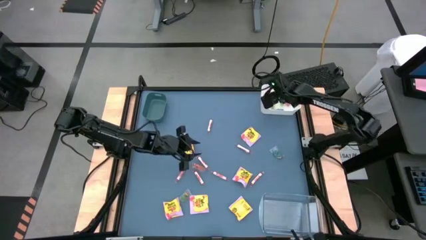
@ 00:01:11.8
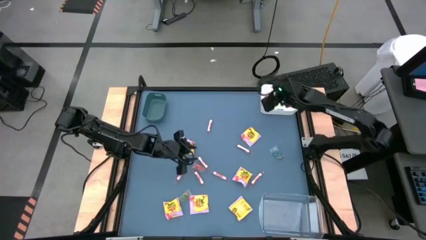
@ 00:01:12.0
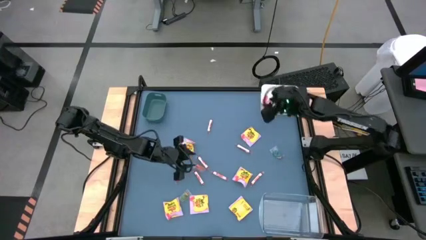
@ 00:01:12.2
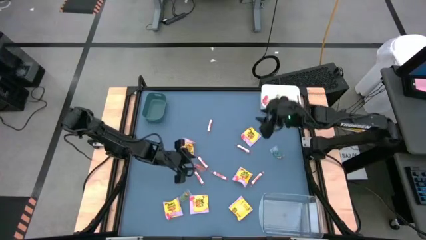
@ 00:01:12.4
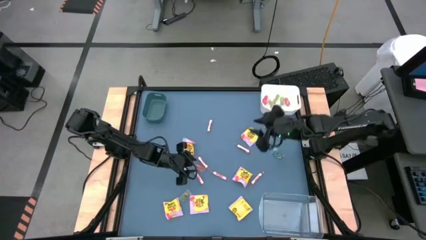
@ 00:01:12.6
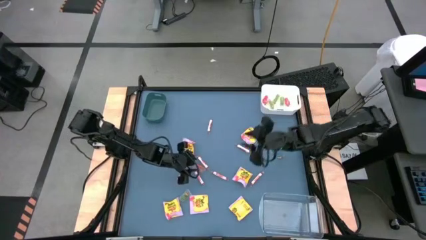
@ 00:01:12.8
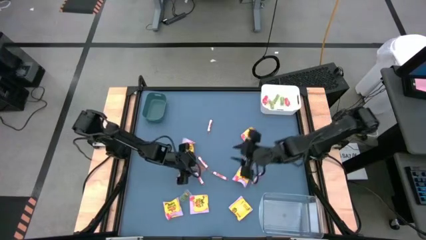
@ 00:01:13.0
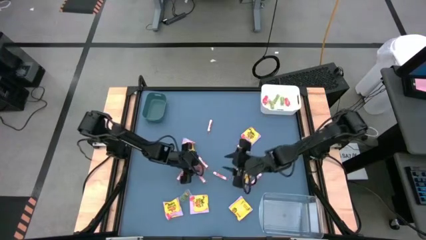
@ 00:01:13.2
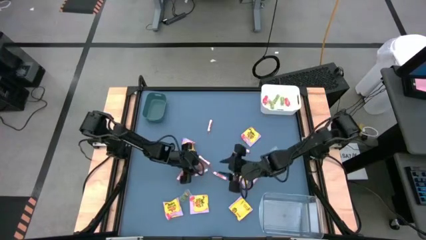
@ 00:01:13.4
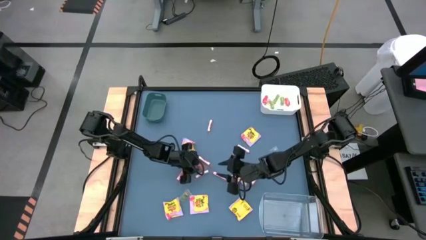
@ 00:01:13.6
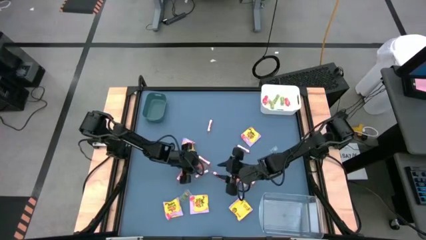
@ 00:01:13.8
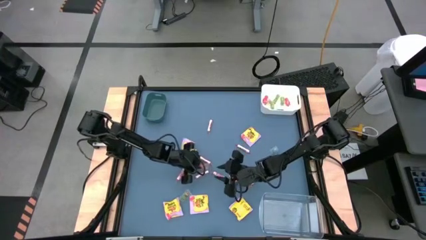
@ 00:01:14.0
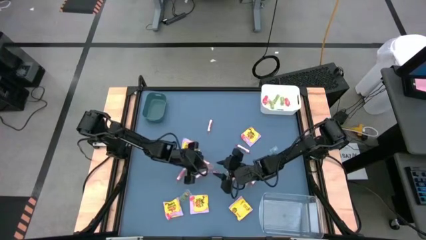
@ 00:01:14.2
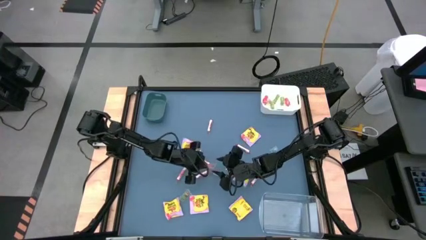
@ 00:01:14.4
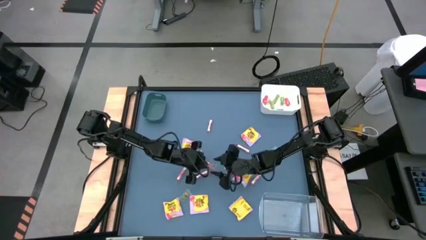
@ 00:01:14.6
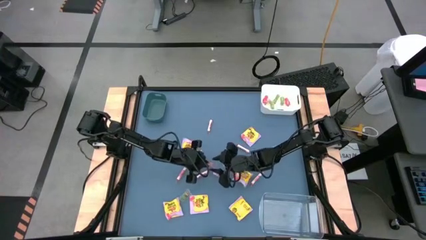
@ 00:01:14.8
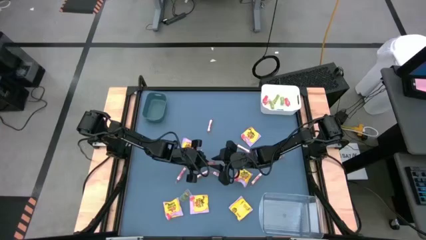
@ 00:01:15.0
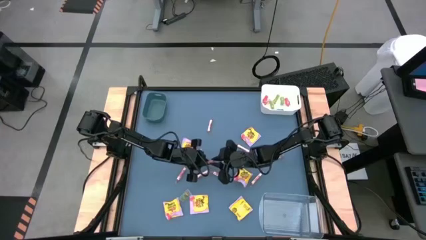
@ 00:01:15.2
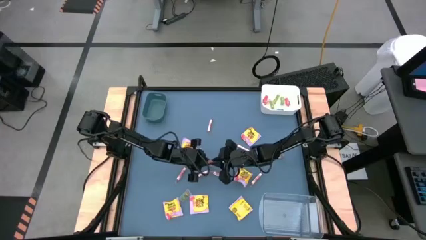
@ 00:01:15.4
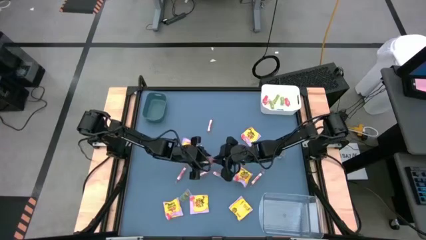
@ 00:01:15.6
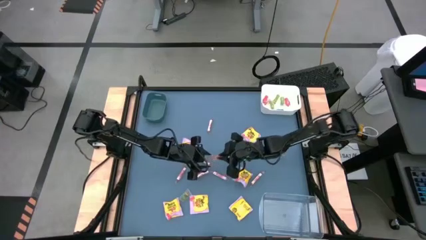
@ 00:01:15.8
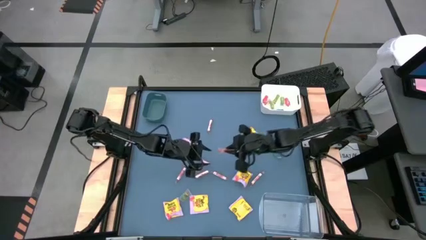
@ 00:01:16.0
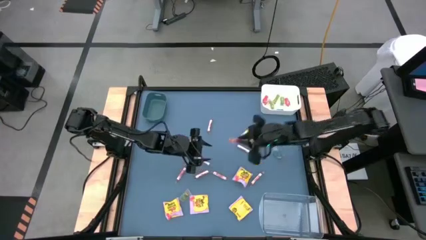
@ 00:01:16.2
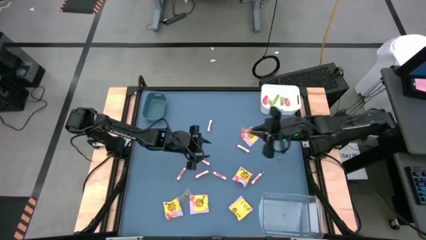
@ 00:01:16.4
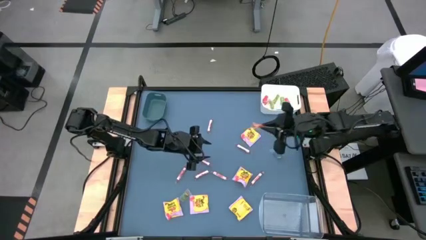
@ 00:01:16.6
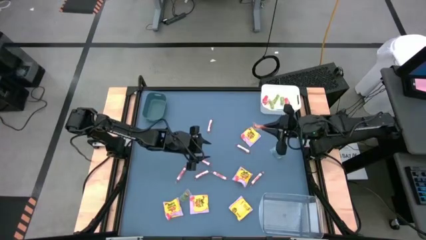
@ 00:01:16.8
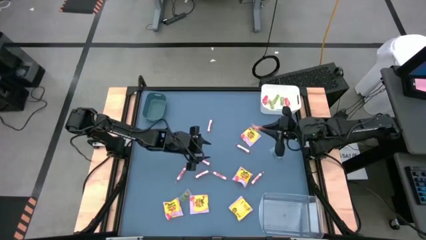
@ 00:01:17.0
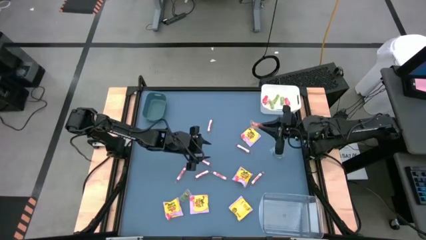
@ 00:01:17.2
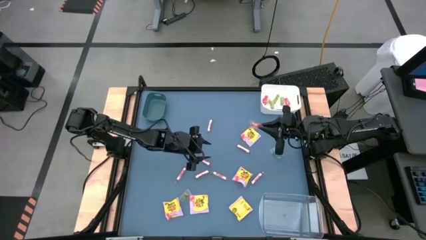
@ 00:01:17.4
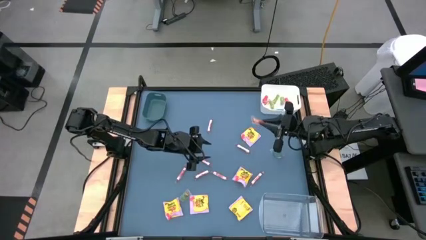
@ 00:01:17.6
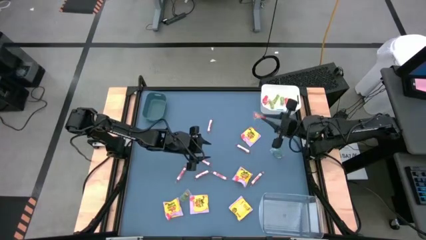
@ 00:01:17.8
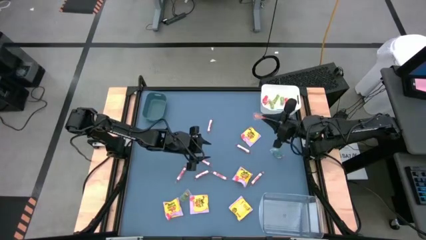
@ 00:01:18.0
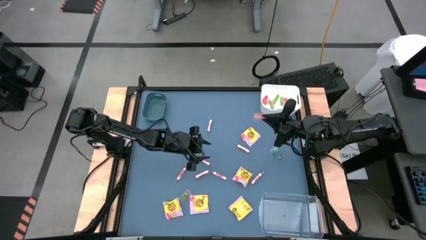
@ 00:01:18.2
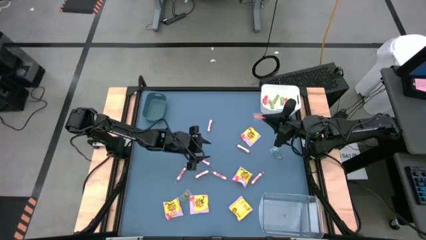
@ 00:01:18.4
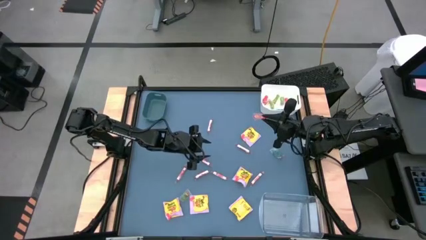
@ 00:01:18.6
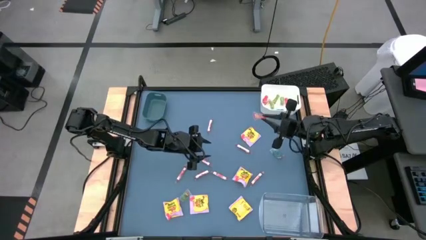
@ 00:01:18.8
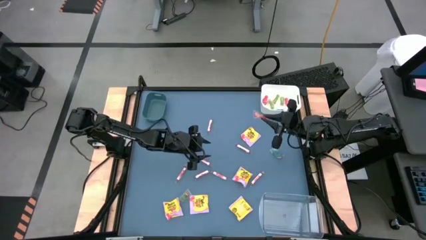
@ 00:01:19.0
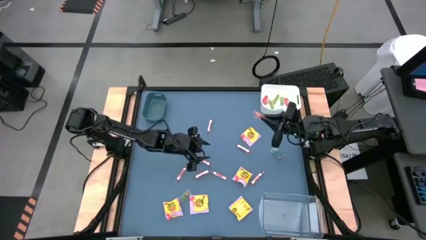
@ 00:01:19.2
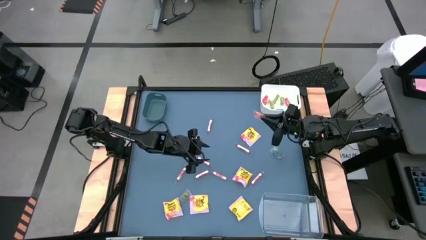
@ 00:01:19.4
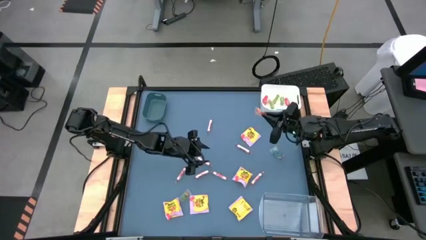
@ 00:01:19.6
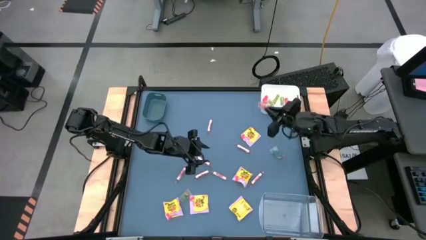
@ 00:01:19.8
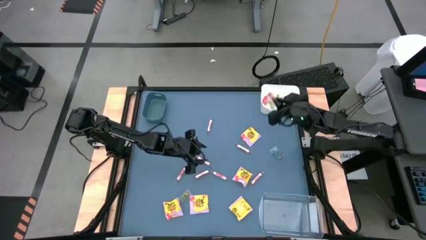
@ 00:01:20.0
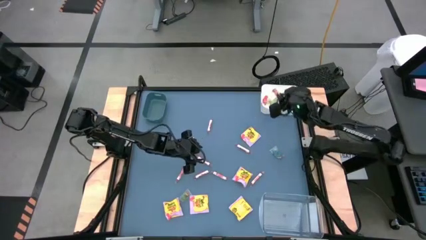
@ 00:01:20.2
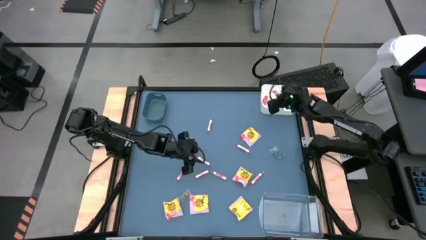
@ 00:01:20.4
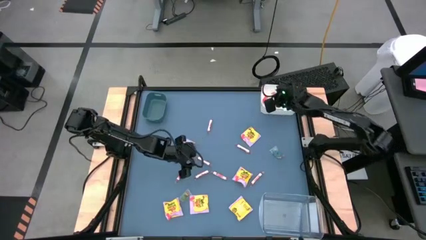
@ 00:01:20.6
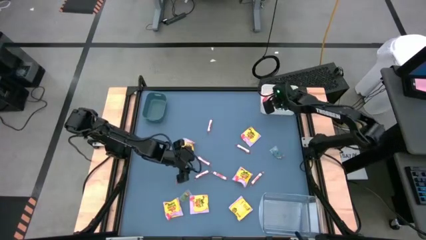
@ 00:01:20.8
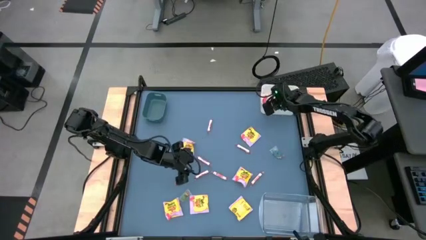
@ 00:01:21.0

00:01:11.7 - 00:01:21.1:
Task: Sort candy
Put the orange gummy into the white bin
